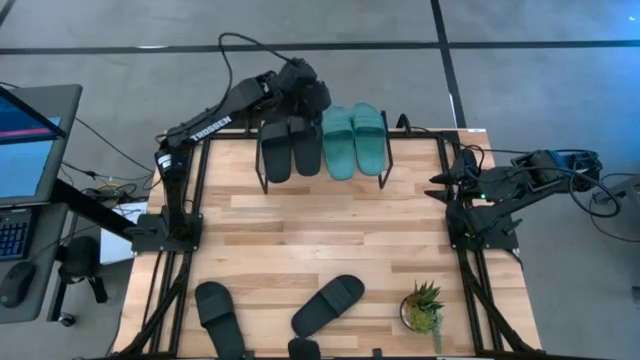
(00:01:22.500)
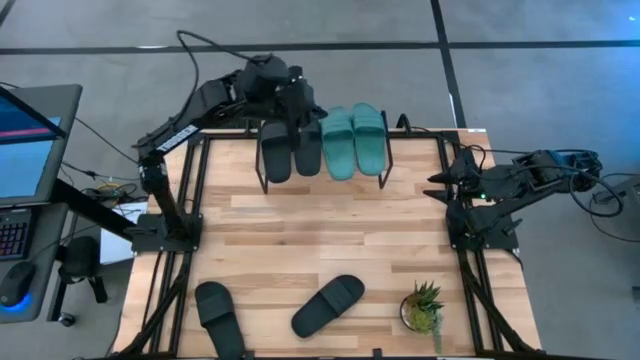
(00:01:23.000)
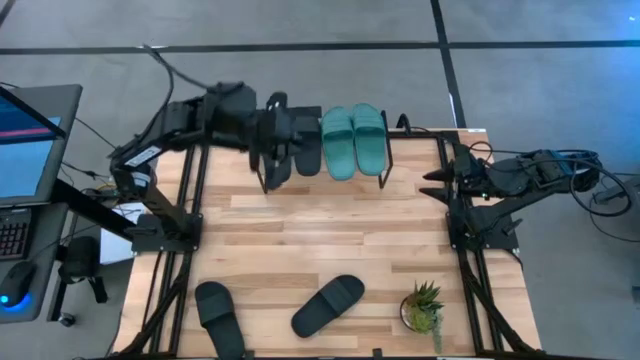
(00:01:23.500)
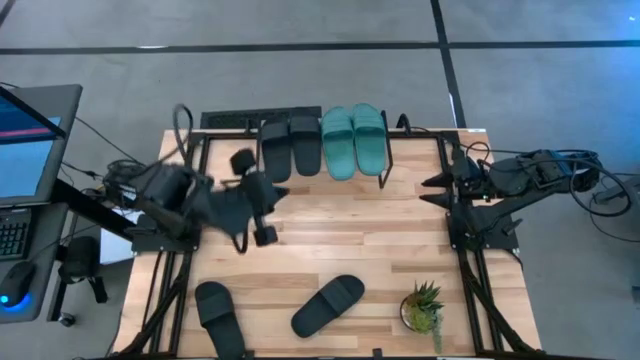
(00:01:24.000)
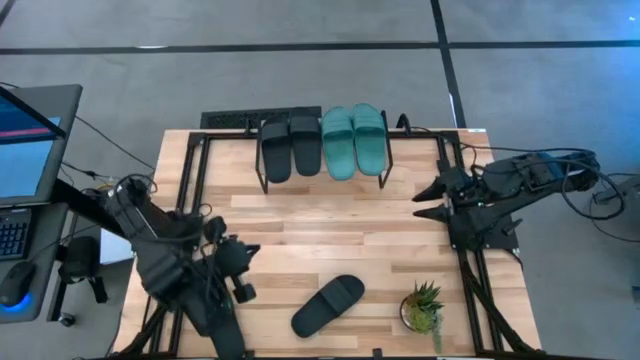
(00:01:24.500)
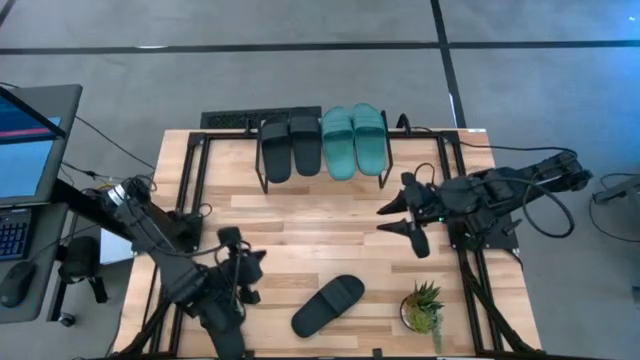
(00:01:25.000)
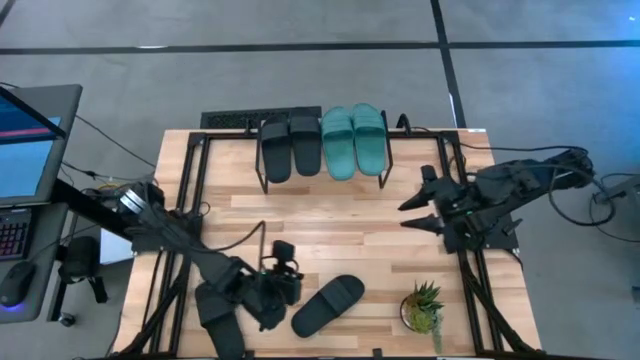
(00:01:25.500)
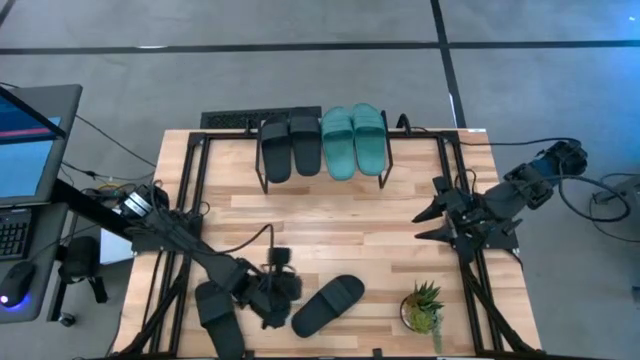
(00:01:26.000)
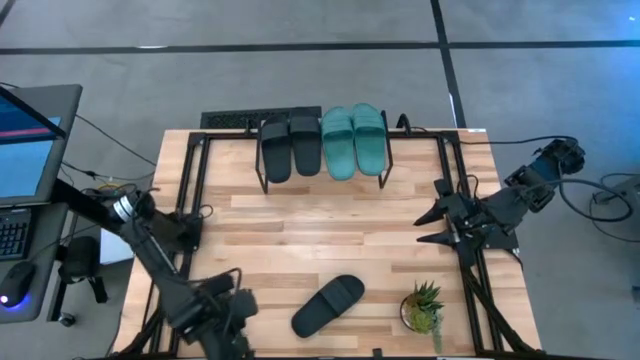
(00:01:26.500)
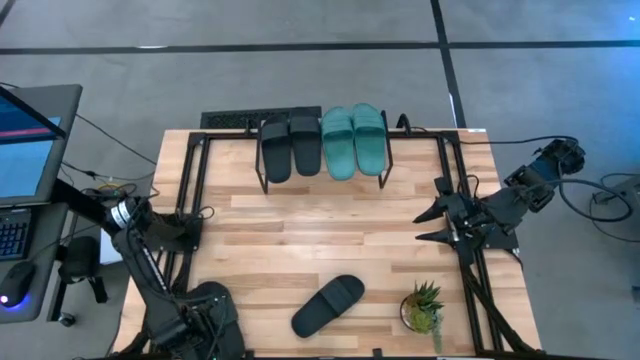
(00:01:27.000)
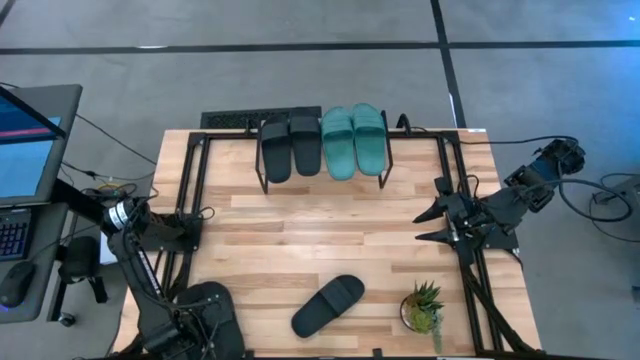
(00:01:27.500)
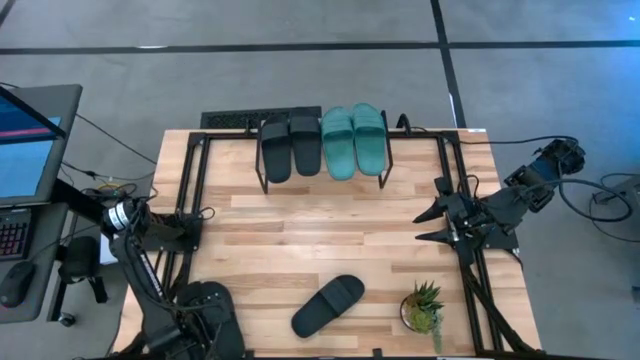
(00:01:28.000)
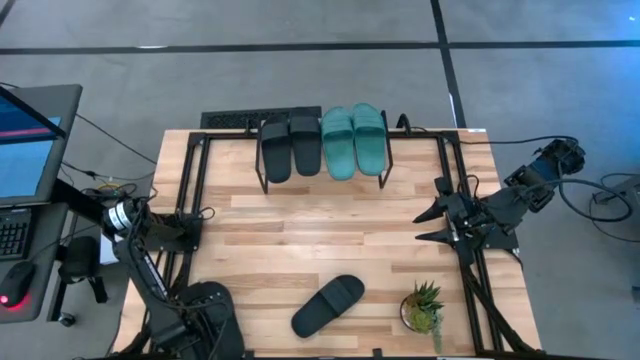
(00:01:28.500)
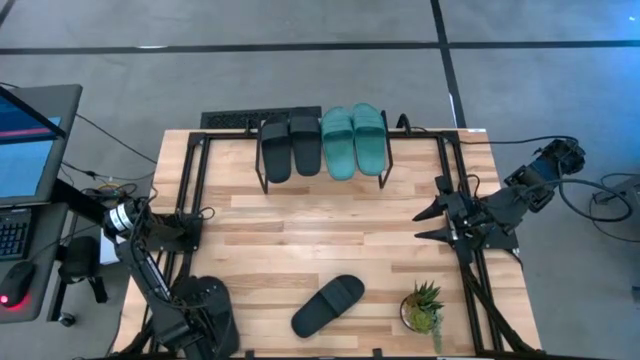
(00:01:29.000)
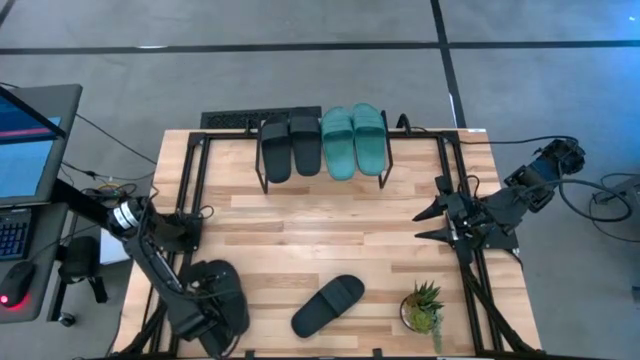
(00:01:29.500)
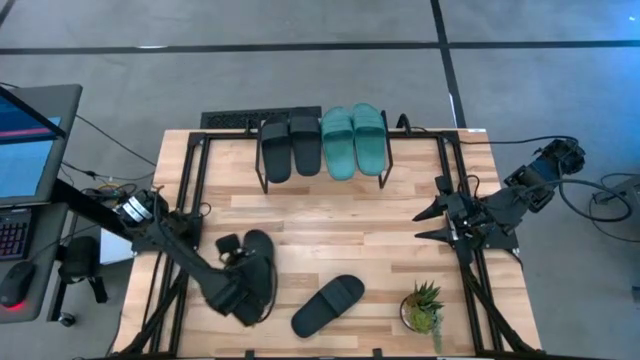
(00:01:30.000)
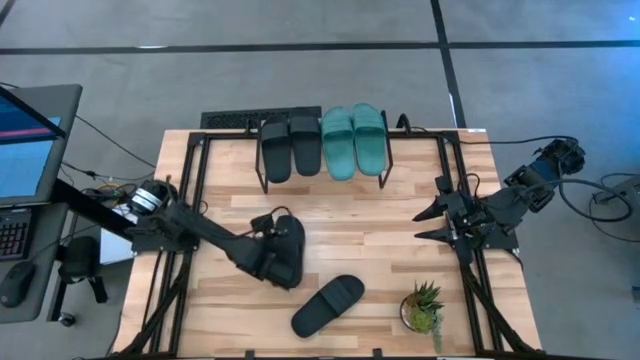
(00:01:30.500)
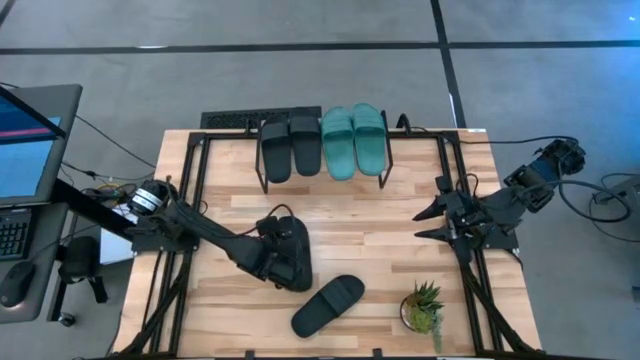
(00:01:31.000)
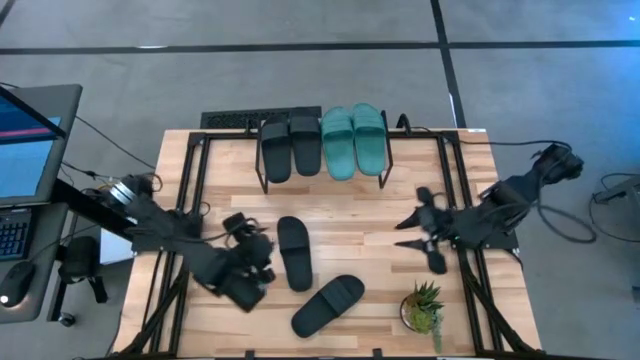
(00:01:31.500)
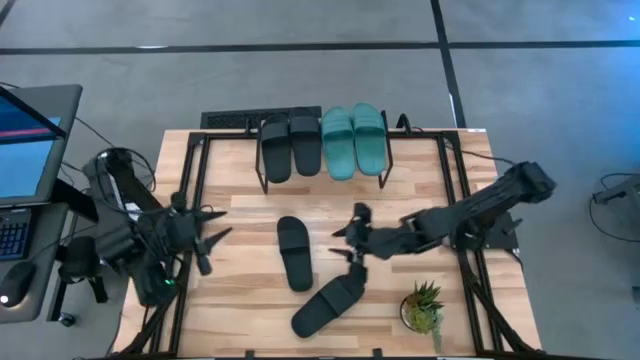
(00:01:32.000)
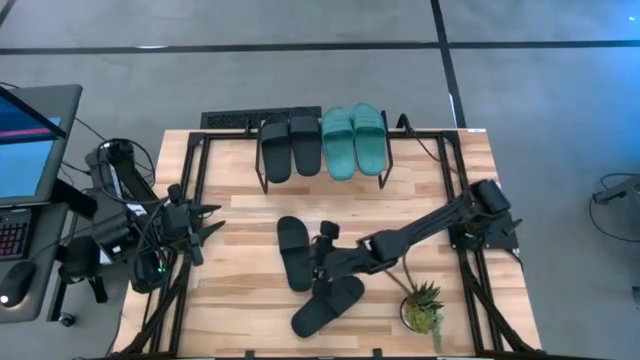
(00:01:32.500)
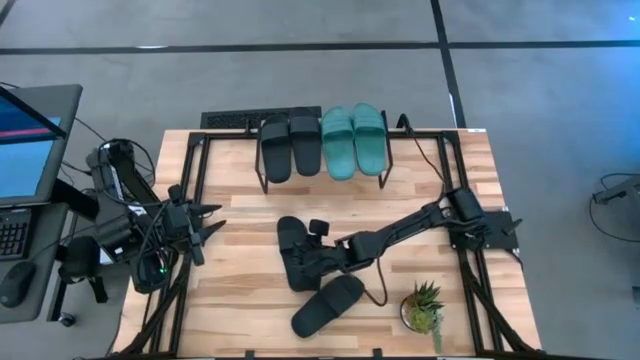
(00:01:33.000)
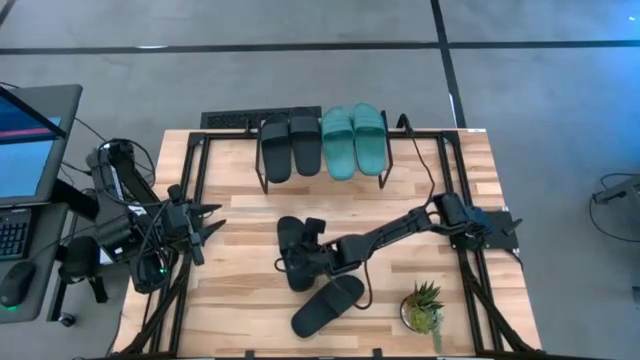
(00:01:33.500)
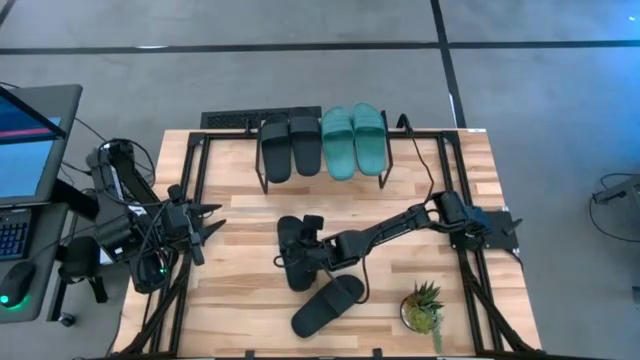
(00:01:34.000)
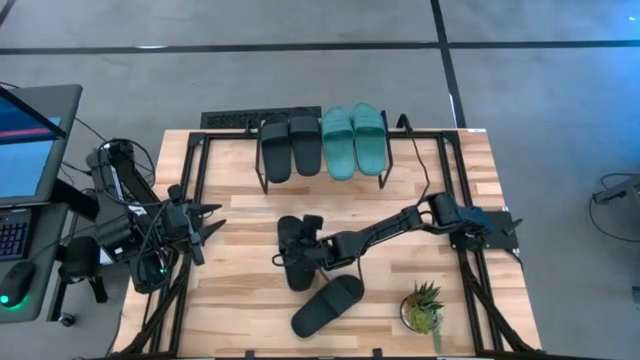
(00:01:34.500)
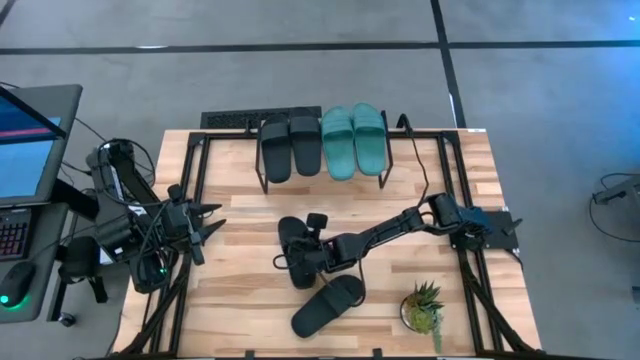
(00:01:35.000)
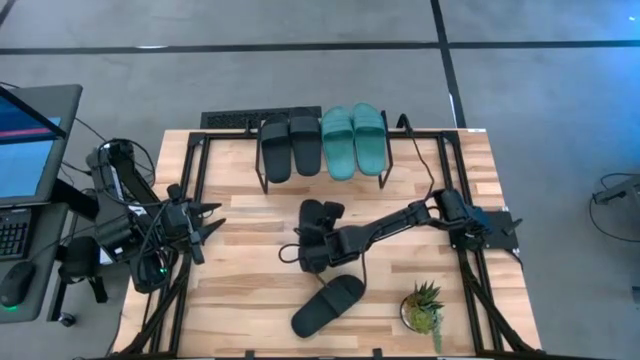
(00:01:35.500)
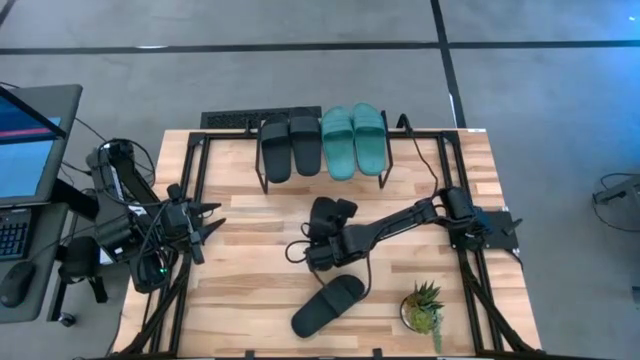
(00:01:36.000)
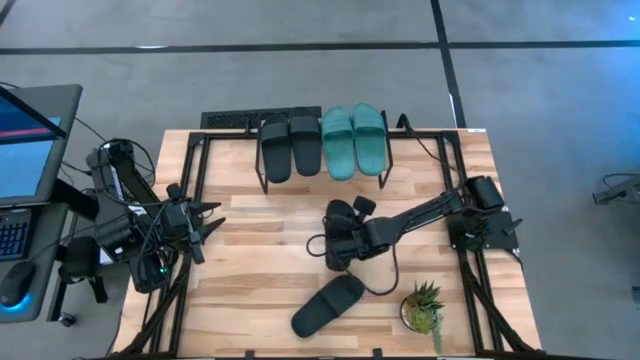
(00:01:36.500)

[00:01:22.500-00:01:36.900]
Task: Pick and place slides into the shelf
Put the black slipper under the shelf

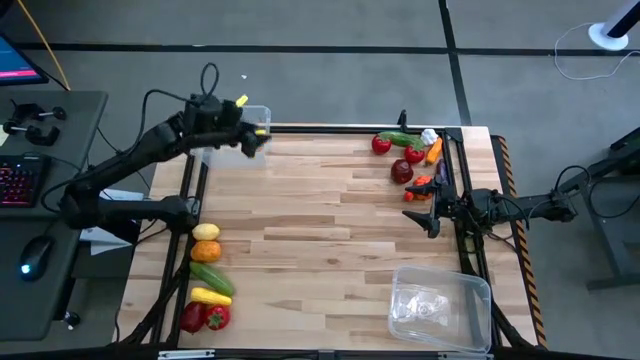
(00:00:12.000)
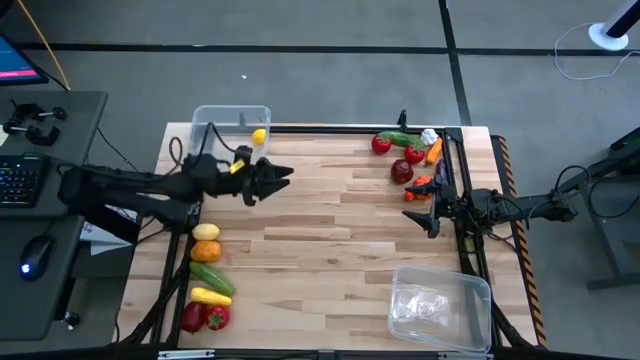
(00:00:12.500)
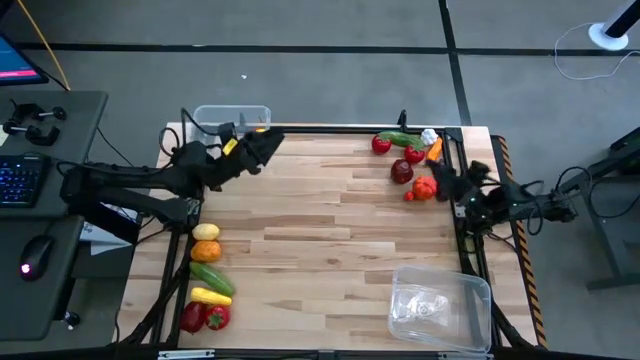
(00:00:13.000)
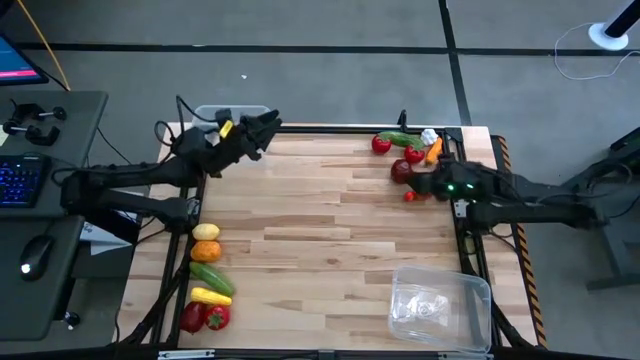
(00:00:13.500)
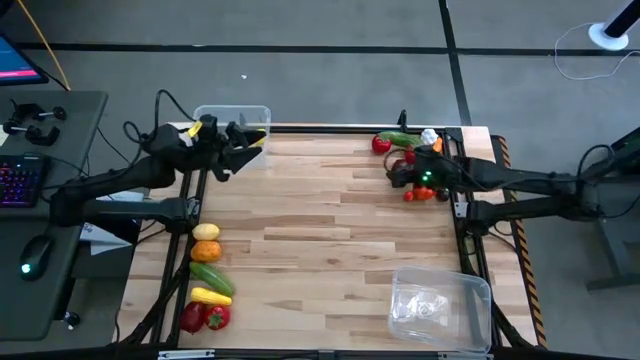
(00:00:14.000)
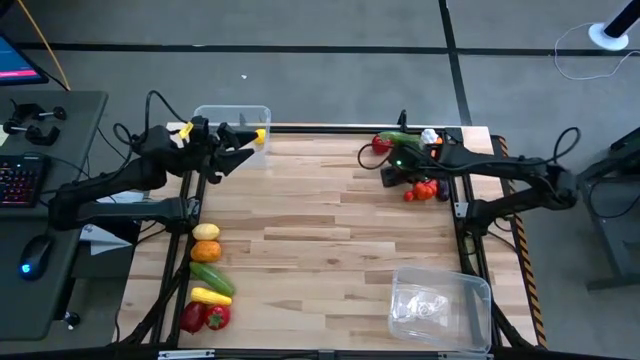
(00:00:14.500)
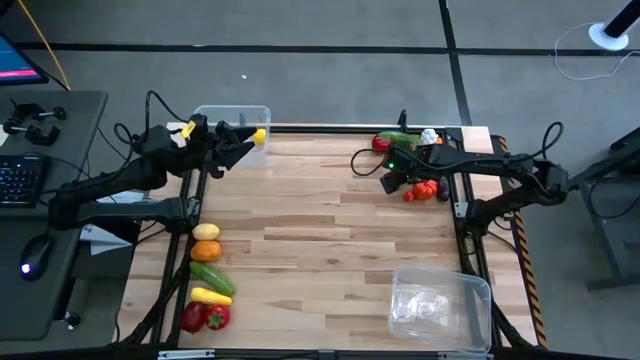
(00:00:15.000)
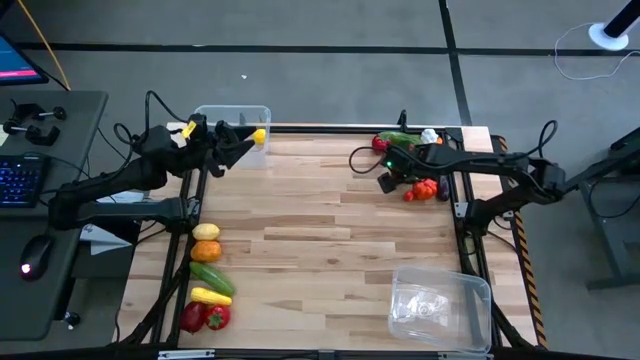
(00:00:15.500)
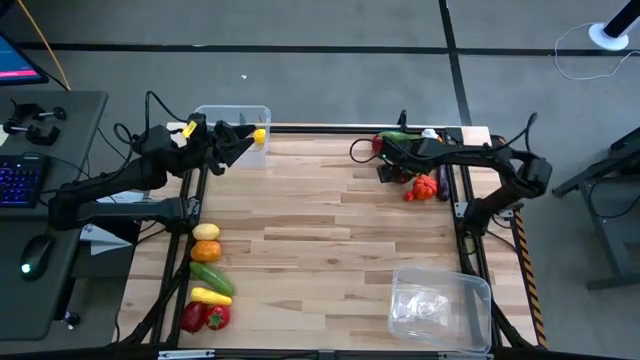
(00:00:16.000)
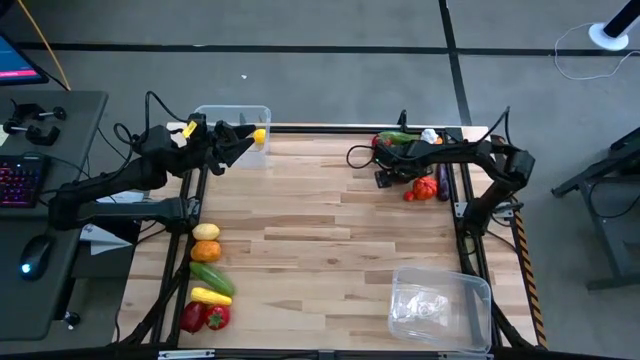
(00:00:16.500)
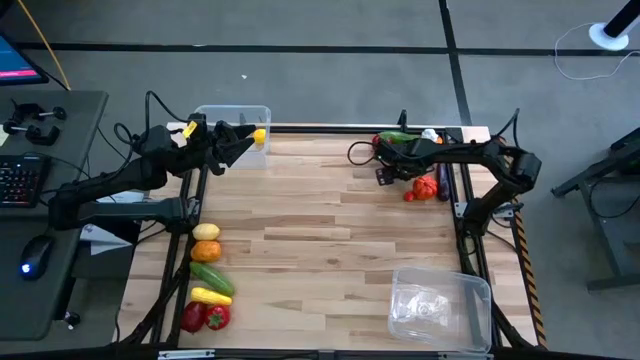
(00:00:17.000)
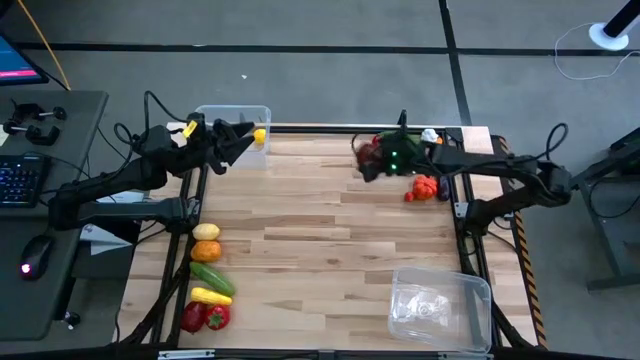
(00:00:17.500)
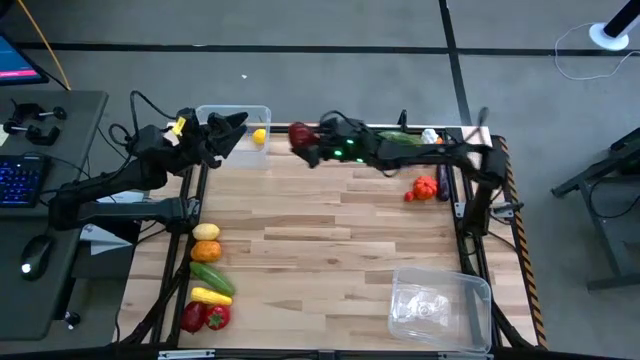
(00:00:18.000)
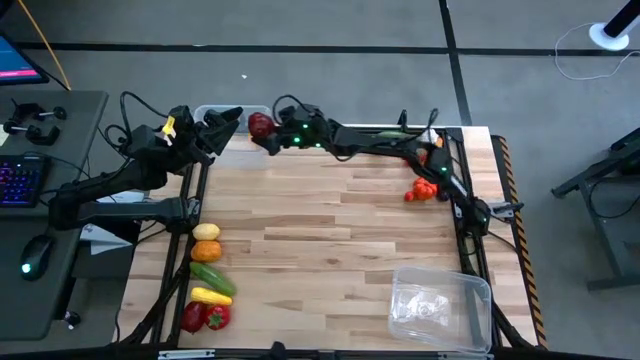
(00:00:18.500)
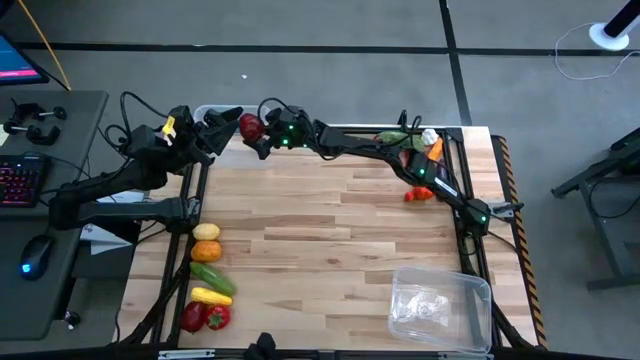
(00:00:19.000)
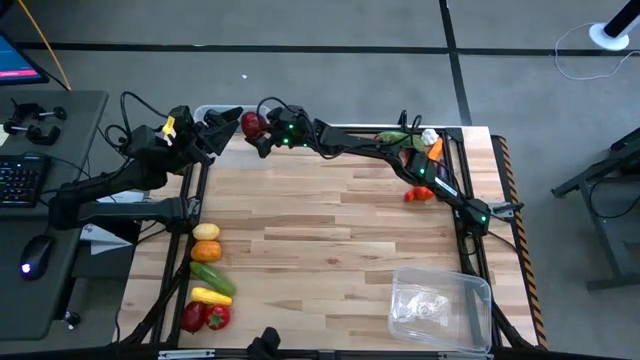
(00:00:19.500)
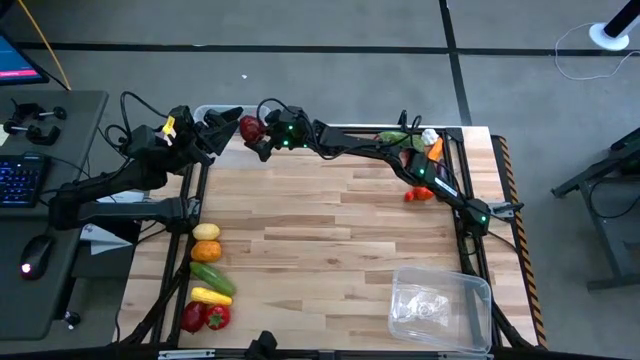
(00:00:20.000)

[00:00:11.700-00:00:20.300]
Task: Sort produce into baskets
Put the top red apple into the top transparent bin
